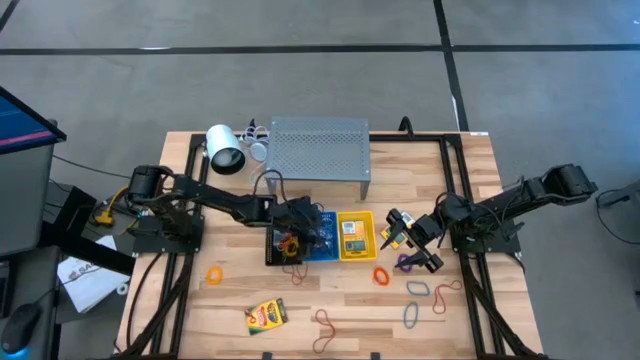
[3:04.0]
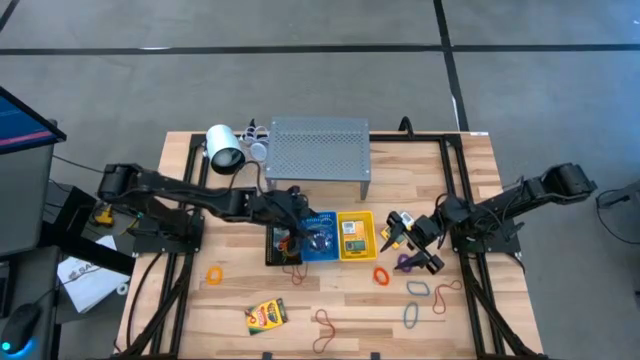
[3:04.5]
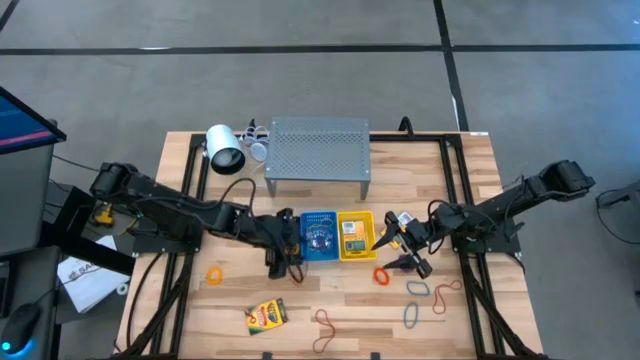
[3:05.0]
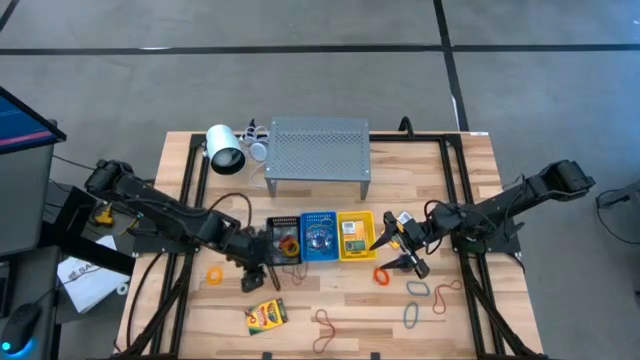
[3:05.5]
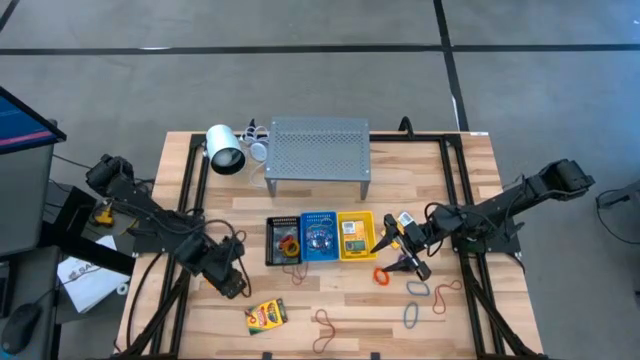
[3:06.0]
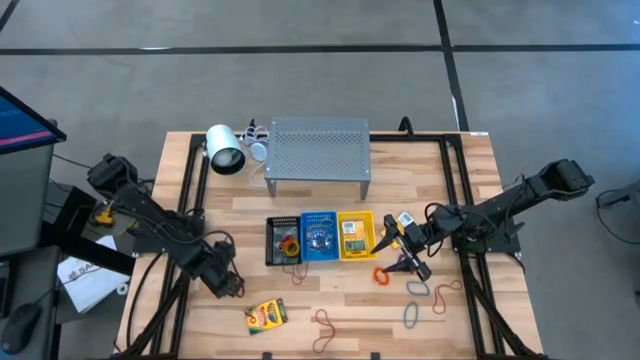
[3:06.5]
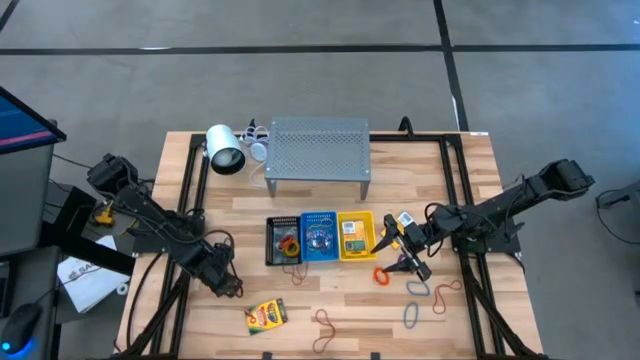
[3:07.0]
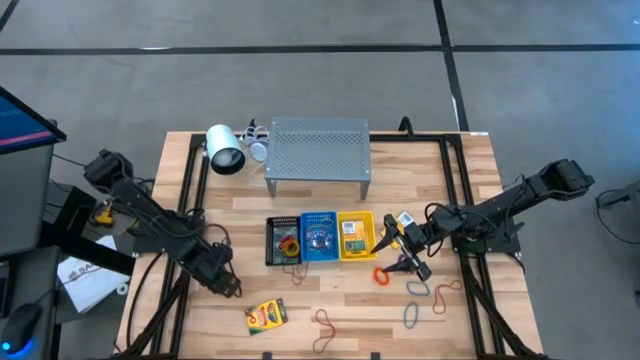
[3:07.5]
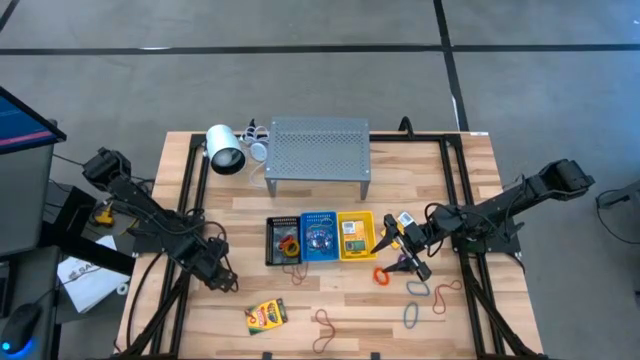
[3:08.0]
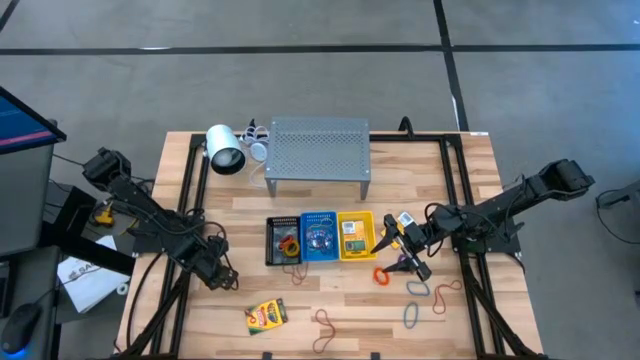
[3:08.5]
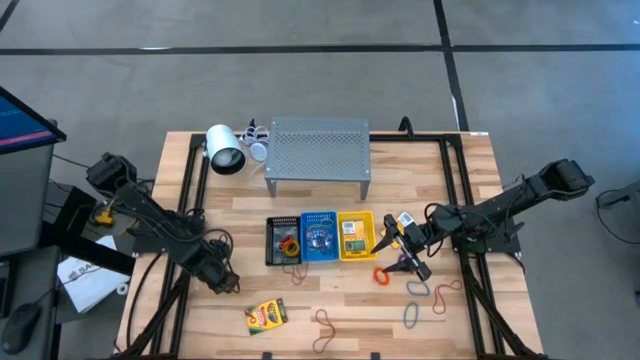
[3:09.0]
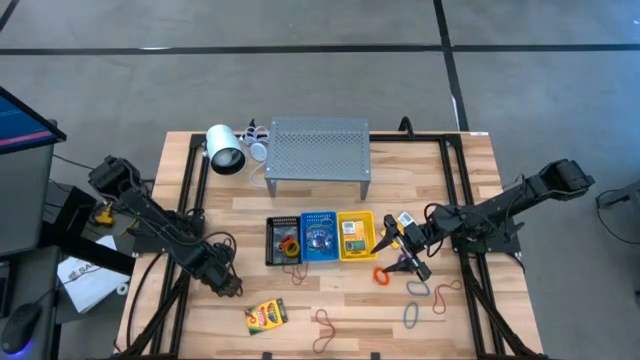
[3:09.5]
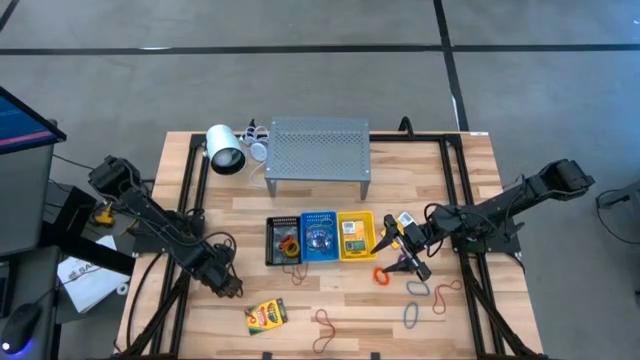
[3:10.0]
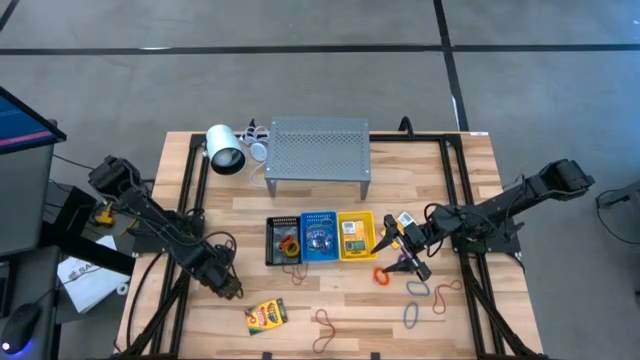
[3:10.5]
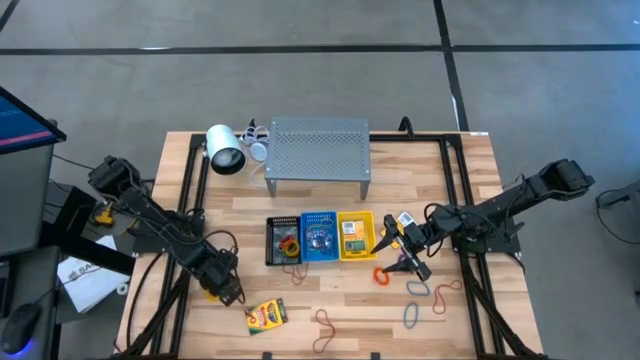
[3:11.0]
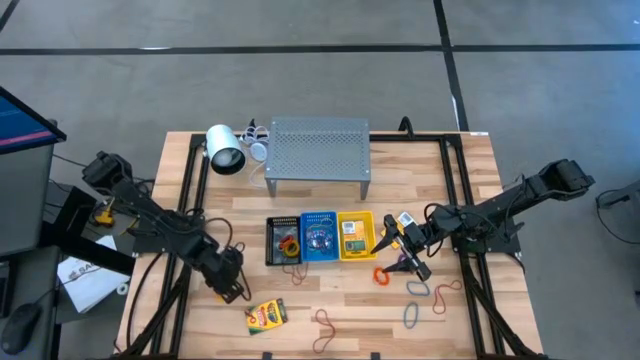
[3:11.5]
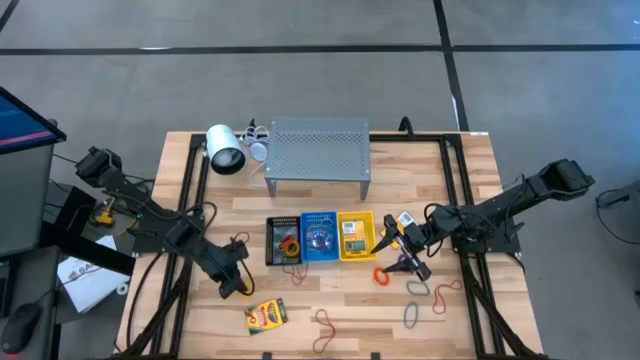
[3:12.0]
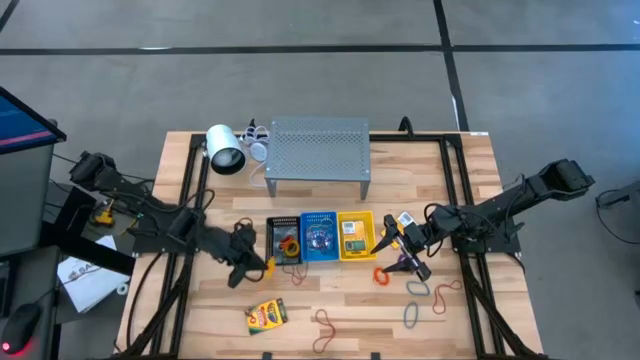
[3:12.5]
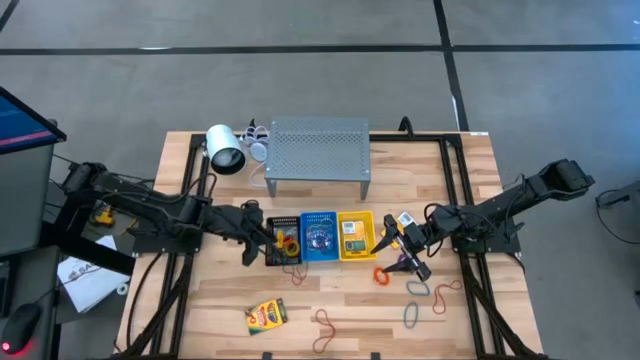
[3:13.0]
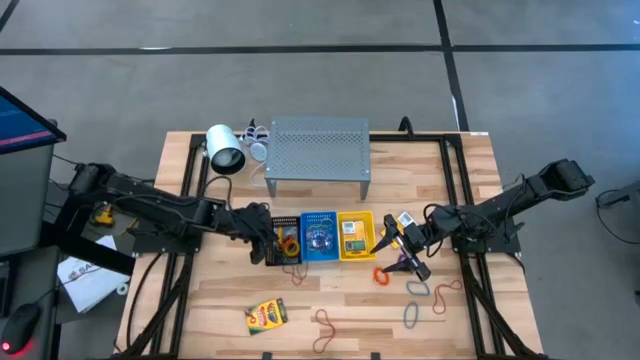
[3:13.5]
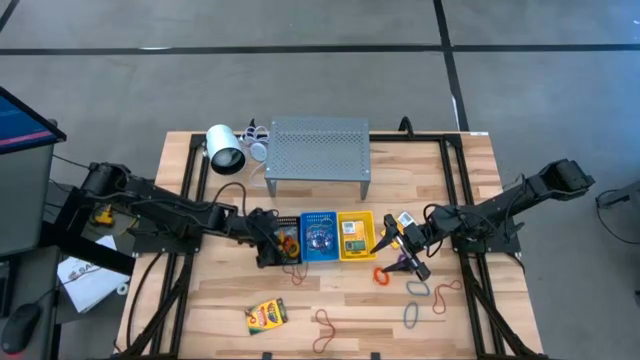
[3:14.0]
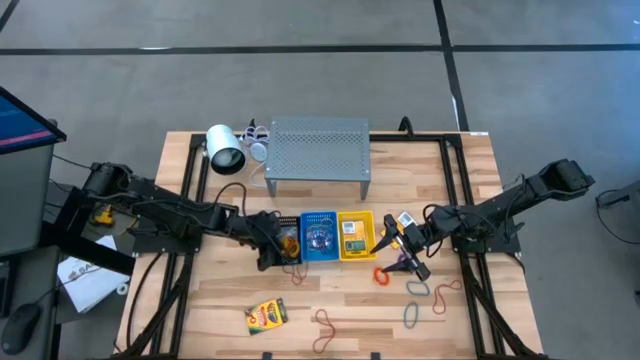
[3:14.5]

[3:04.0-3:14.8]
Task: Pick & Place Office Desk Supplies
Put the yellow spring keychain into the black basket

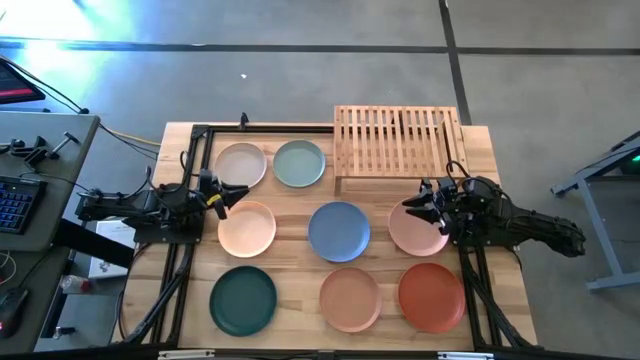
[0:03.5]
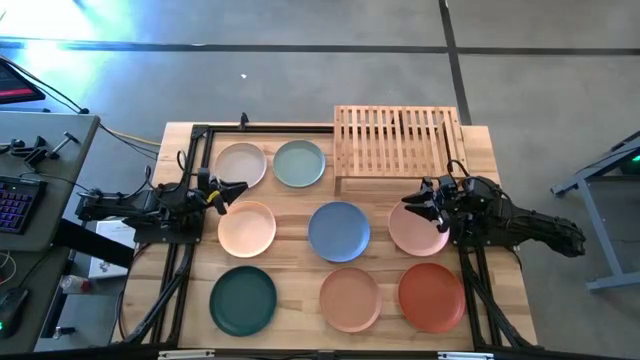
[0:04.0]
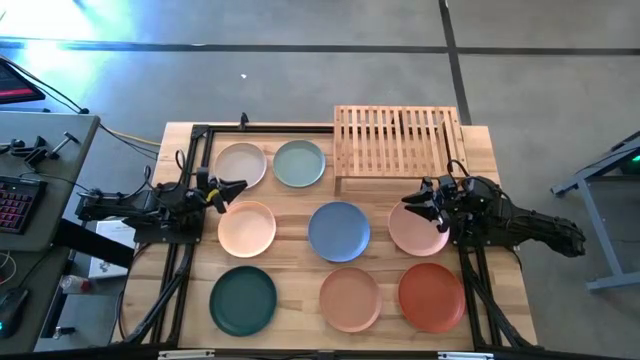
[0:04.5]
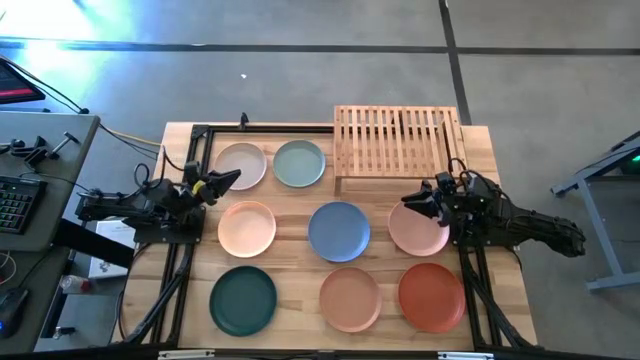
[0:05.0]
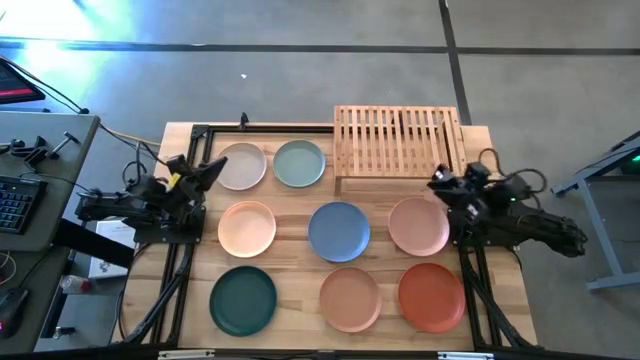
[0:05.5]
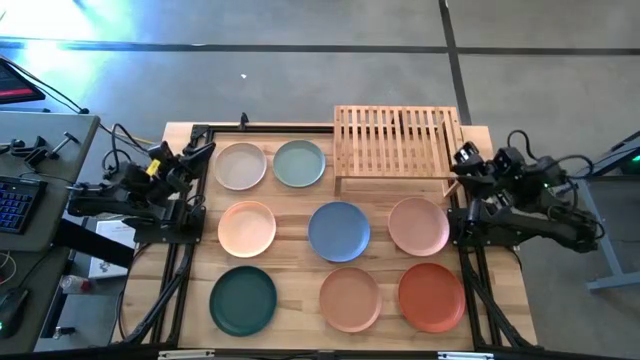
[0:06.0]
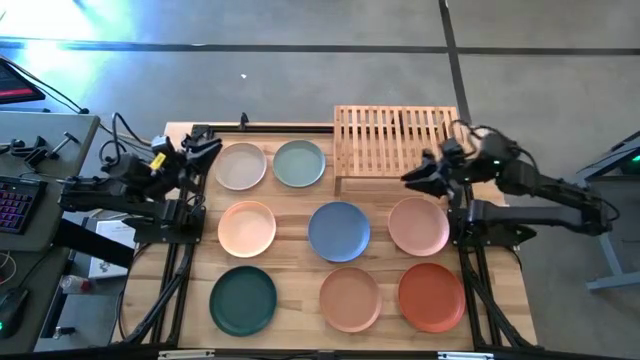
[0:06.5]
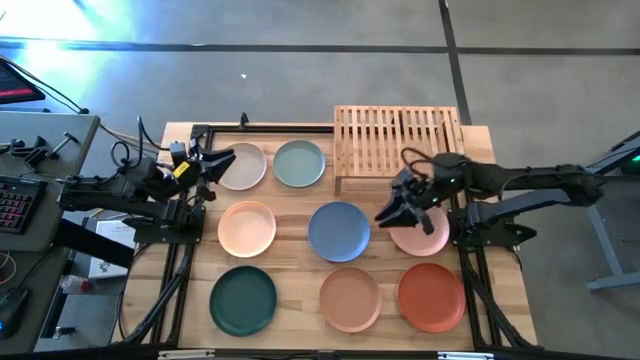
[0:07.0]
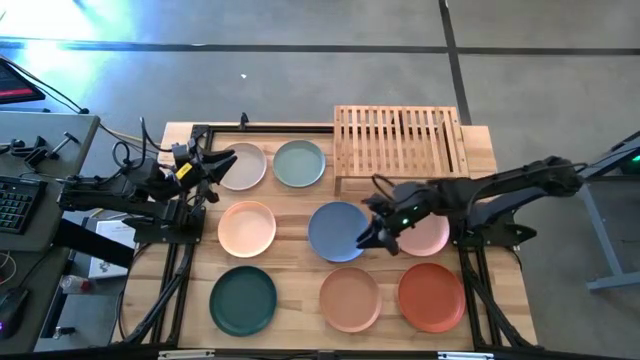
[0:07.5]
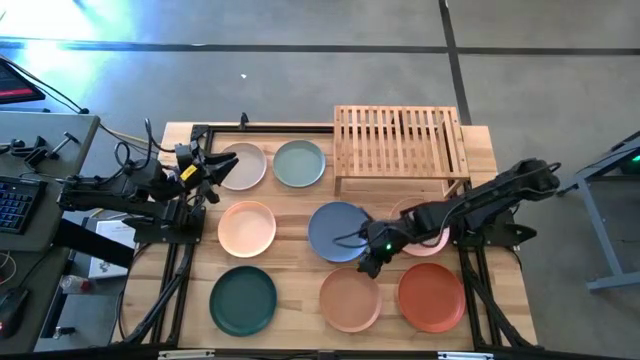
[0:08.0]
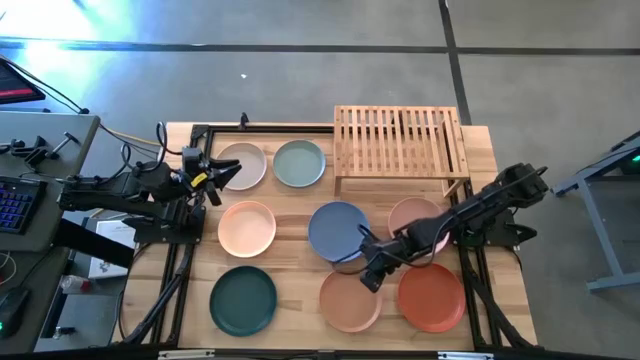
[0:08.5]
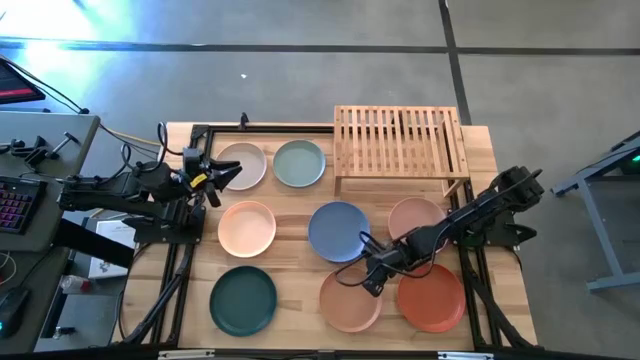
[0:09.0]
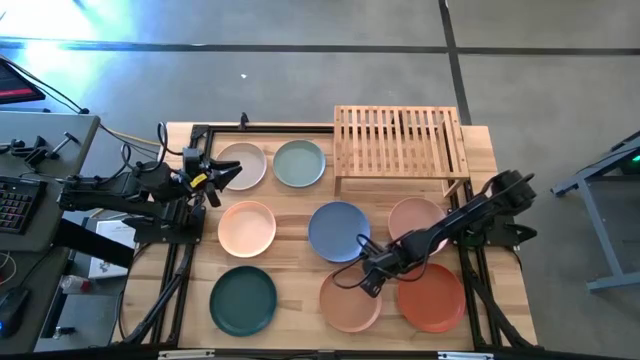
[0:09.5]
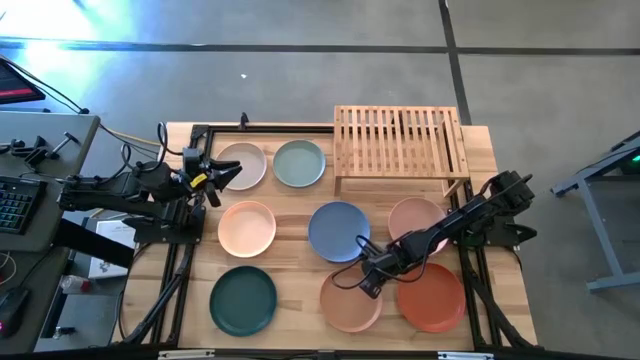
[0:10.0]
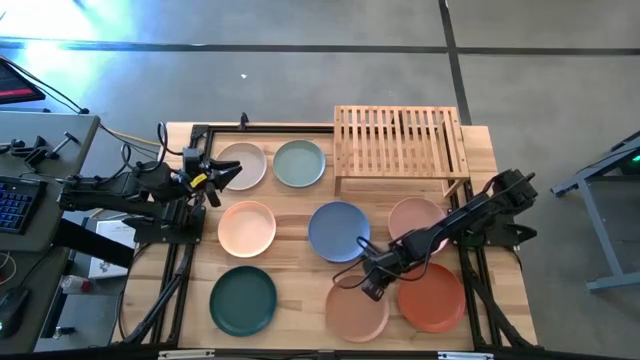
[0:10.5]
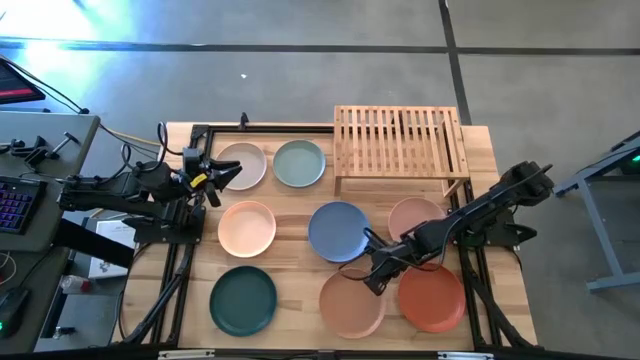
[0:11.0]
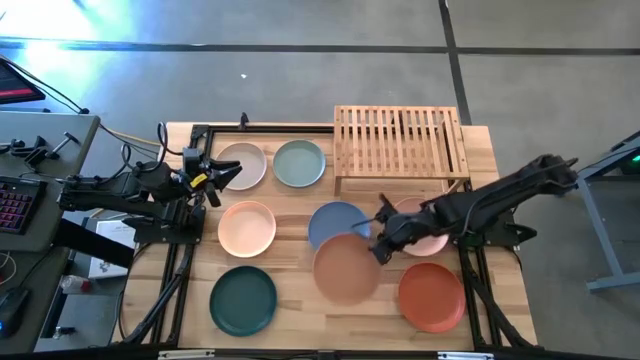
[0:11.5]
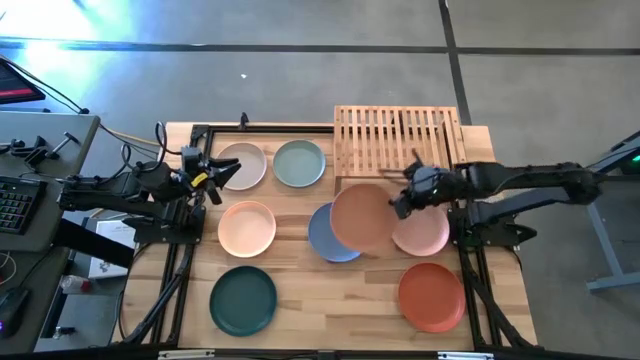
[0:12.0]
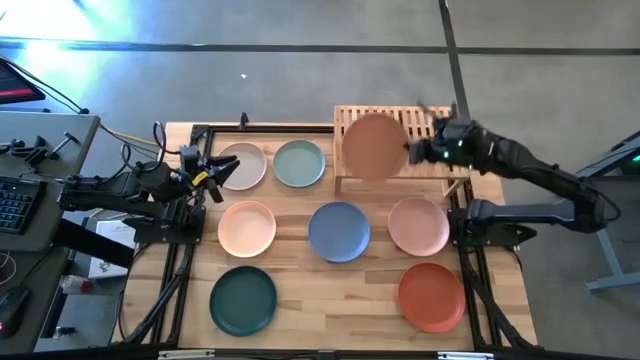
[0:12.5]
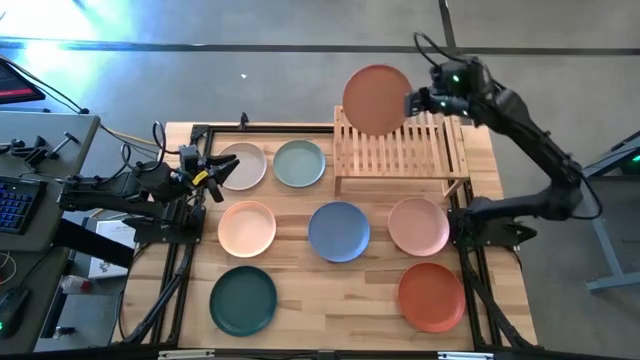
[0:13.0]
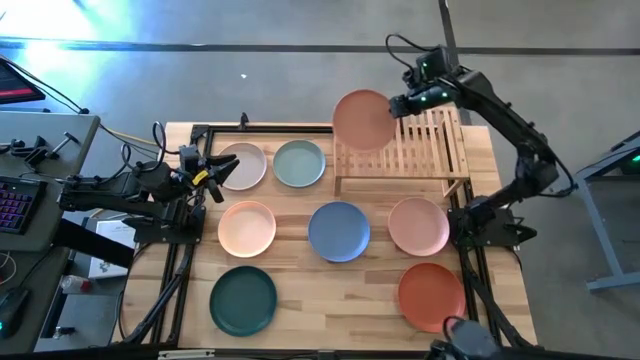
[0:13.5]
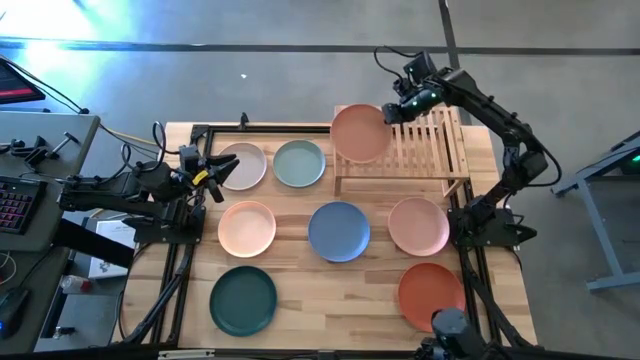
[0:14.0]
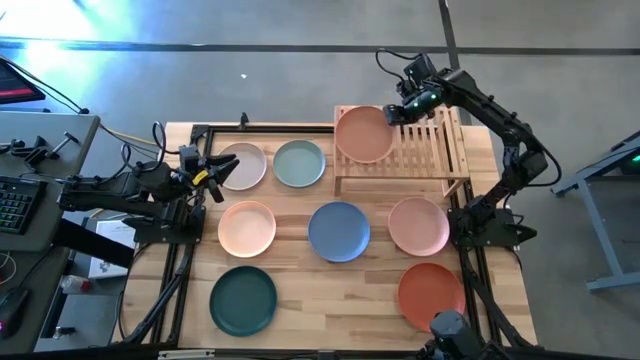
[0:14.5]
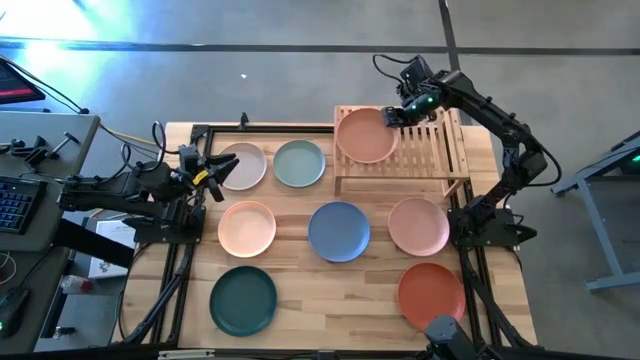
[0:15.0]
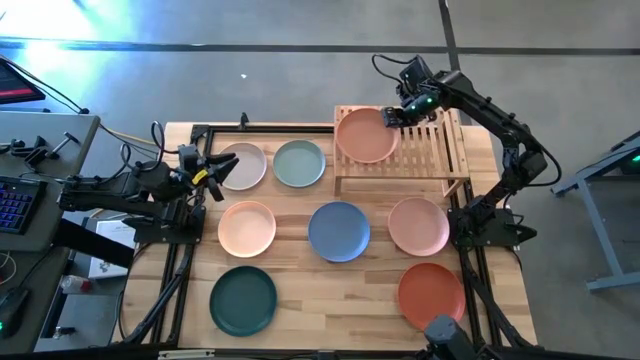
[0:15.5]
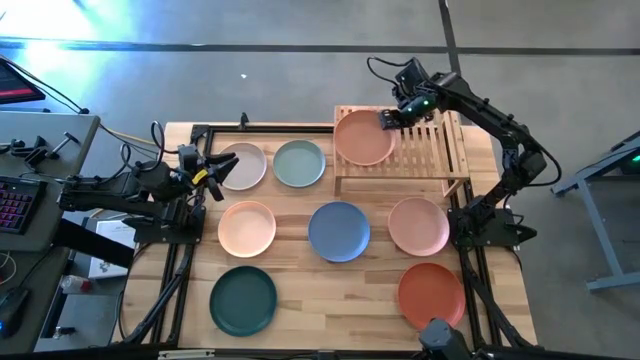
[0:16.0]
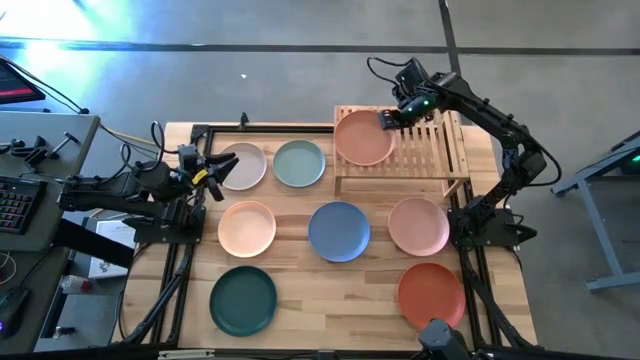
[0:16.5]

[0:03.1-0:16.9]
Task: Place and stack plates onto a shelf
Put the brown plate on the the shelf
